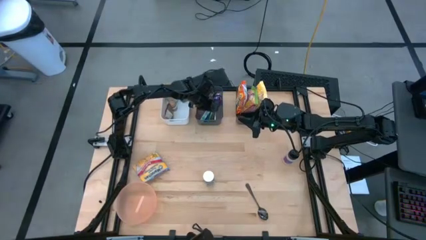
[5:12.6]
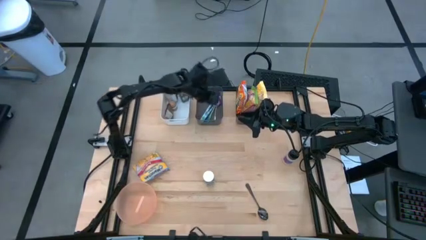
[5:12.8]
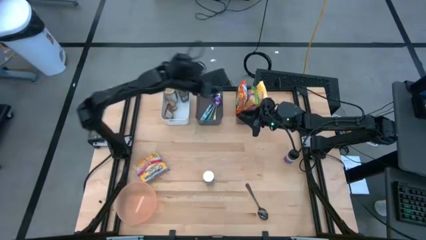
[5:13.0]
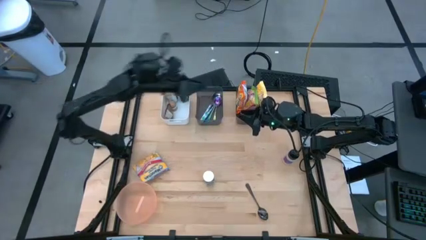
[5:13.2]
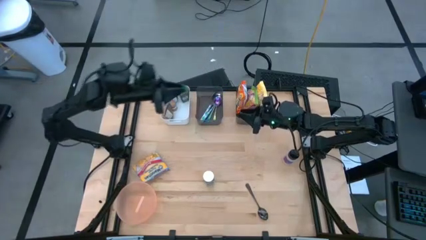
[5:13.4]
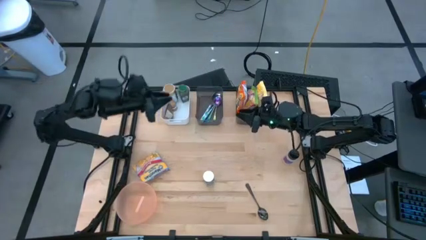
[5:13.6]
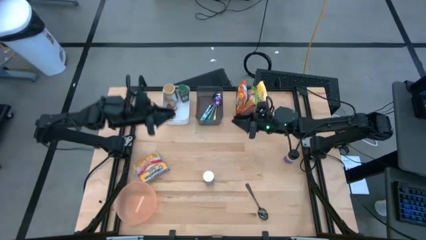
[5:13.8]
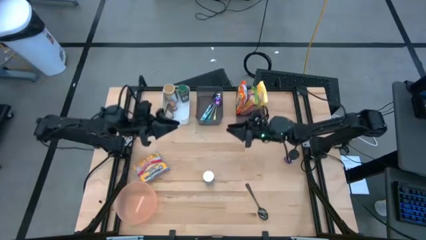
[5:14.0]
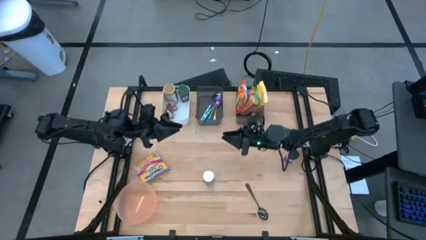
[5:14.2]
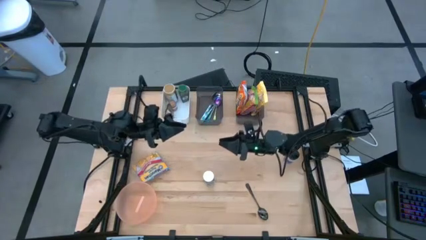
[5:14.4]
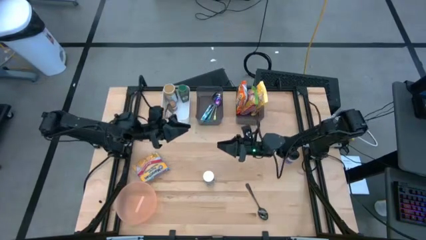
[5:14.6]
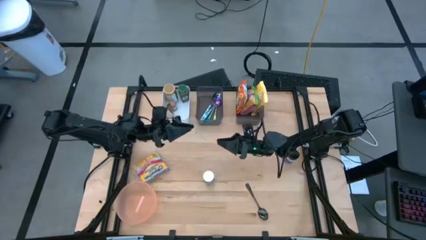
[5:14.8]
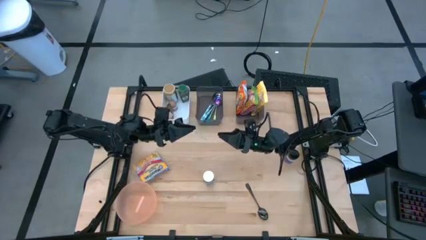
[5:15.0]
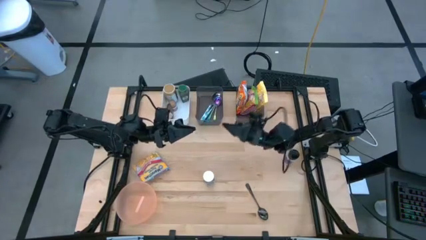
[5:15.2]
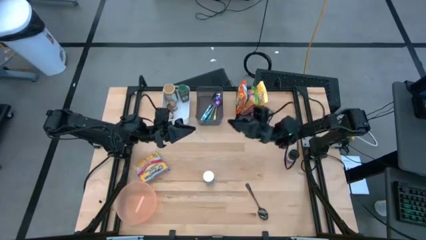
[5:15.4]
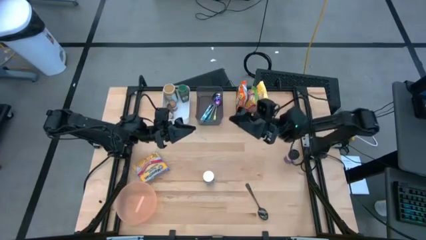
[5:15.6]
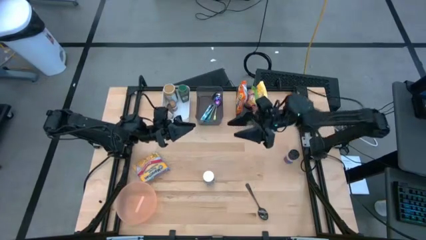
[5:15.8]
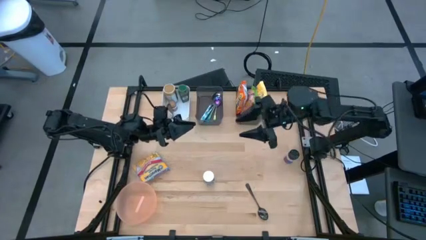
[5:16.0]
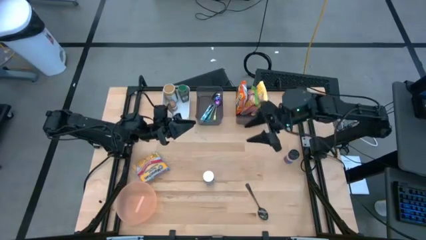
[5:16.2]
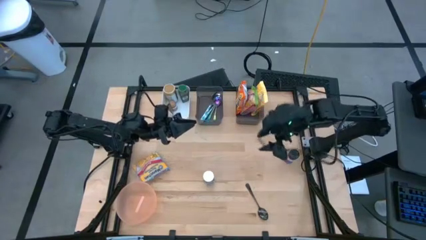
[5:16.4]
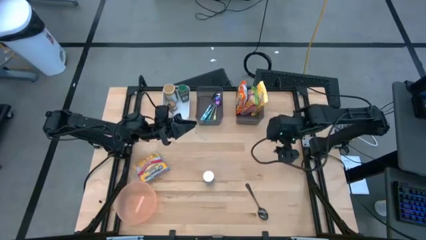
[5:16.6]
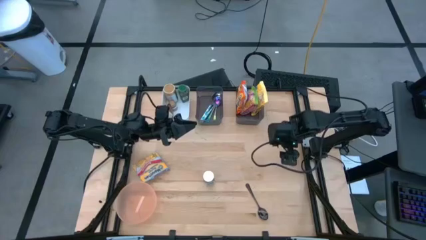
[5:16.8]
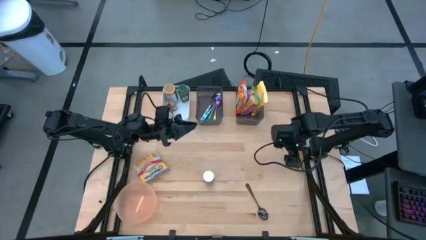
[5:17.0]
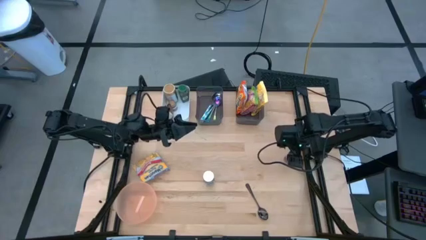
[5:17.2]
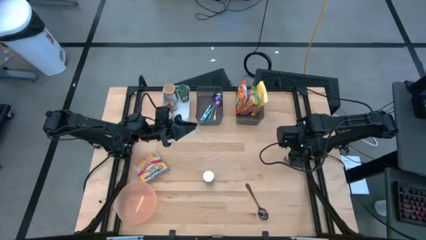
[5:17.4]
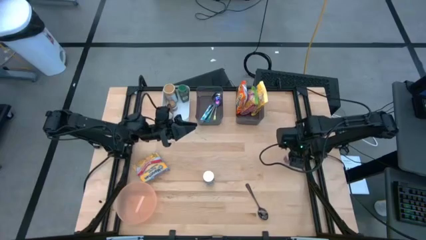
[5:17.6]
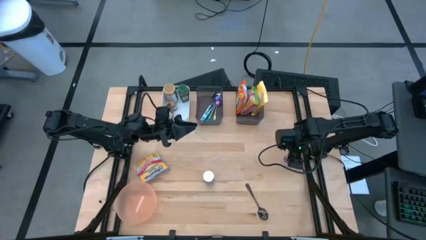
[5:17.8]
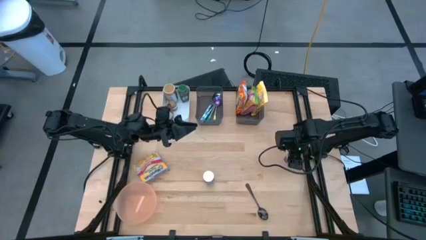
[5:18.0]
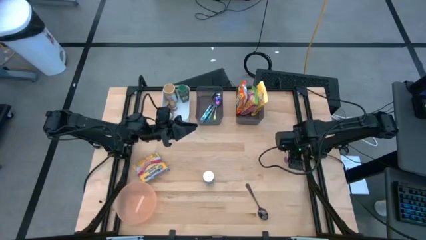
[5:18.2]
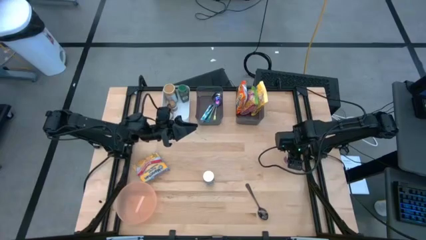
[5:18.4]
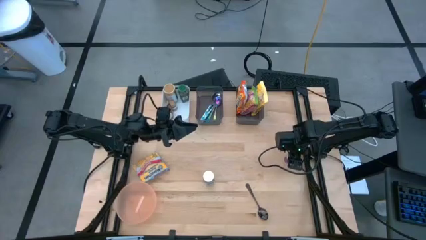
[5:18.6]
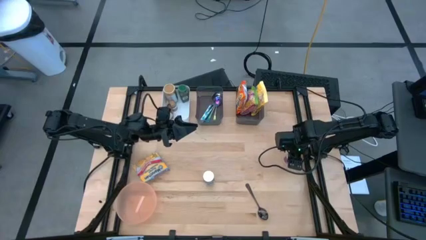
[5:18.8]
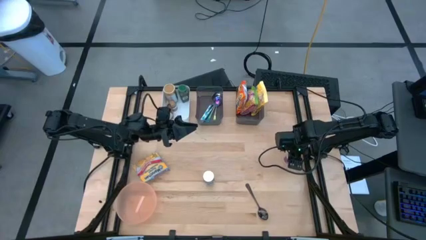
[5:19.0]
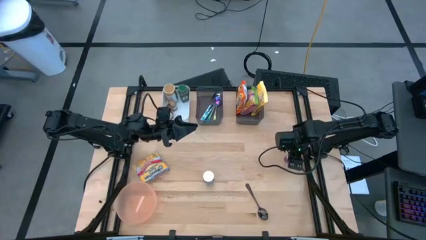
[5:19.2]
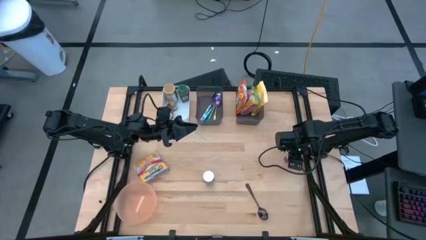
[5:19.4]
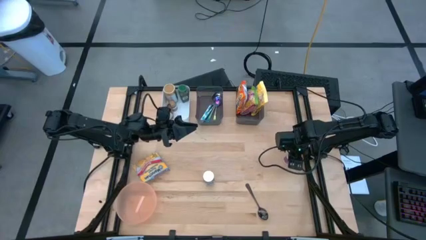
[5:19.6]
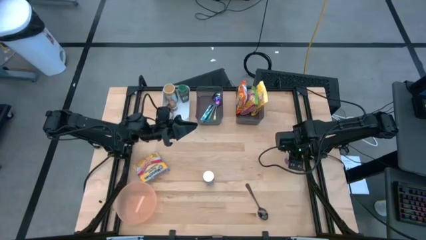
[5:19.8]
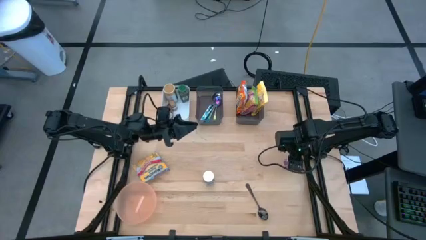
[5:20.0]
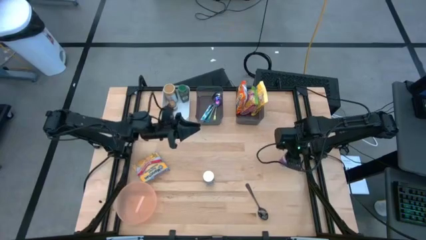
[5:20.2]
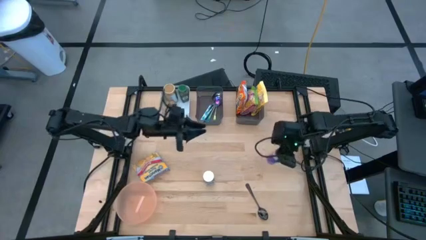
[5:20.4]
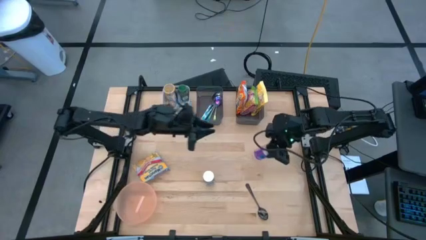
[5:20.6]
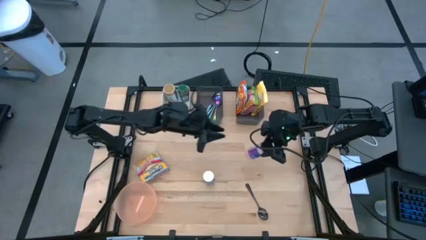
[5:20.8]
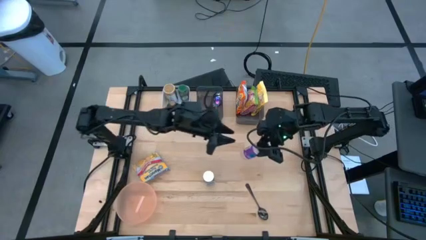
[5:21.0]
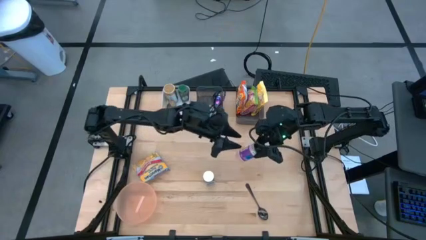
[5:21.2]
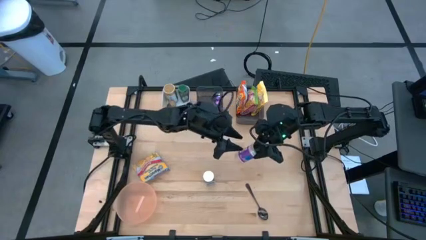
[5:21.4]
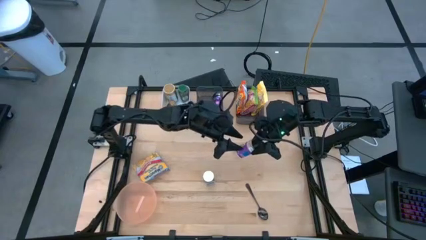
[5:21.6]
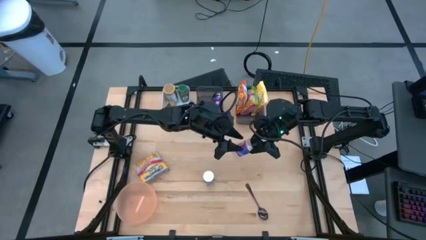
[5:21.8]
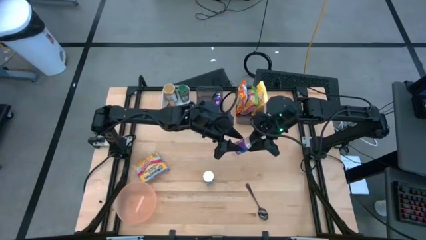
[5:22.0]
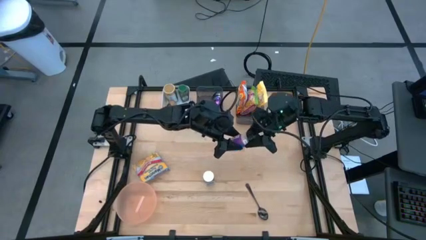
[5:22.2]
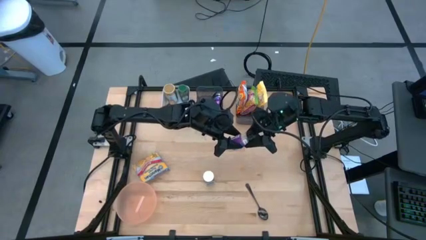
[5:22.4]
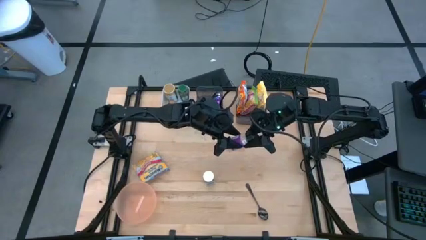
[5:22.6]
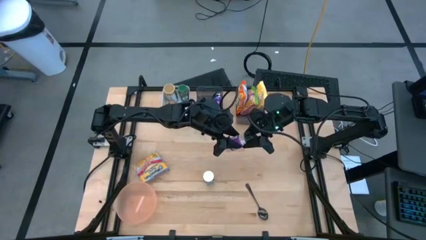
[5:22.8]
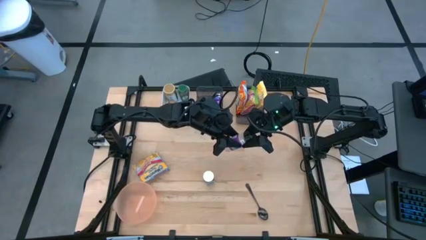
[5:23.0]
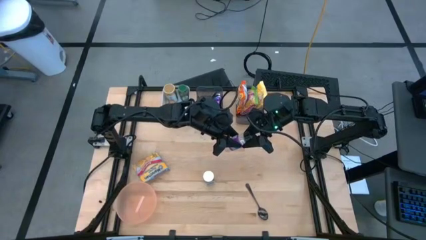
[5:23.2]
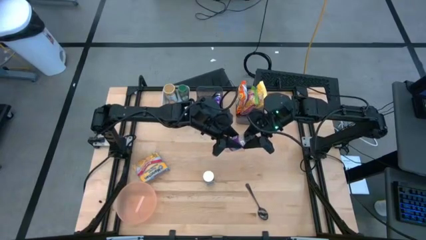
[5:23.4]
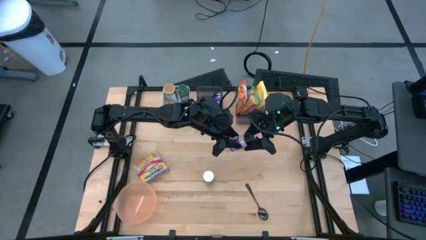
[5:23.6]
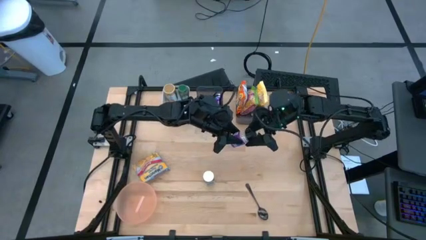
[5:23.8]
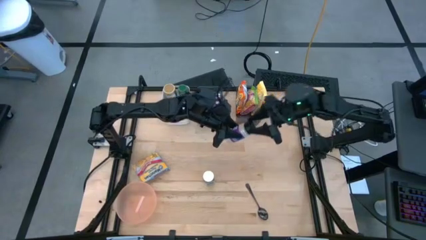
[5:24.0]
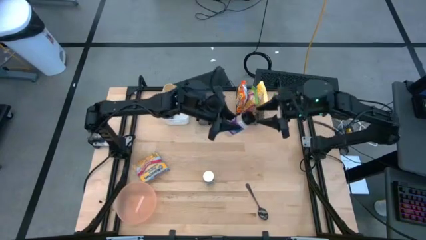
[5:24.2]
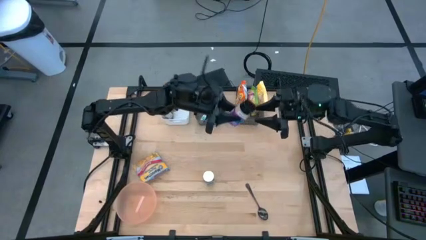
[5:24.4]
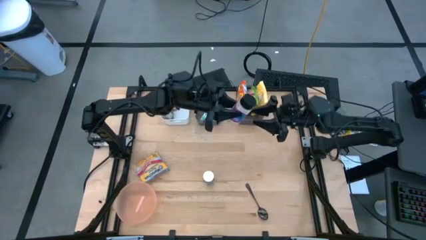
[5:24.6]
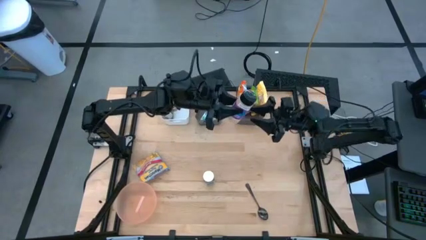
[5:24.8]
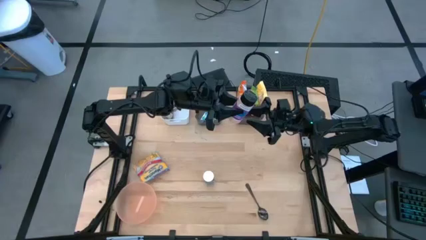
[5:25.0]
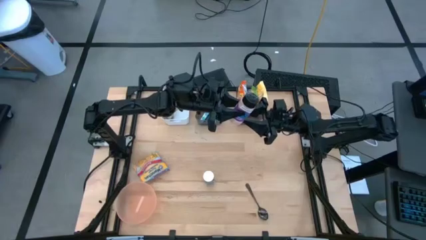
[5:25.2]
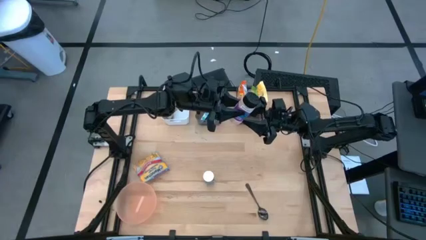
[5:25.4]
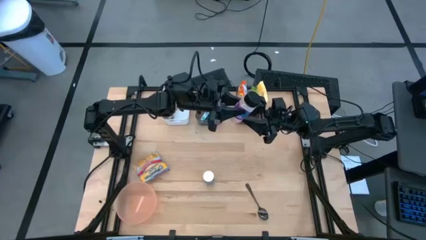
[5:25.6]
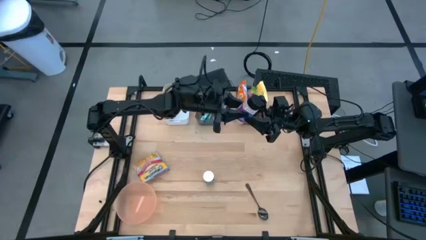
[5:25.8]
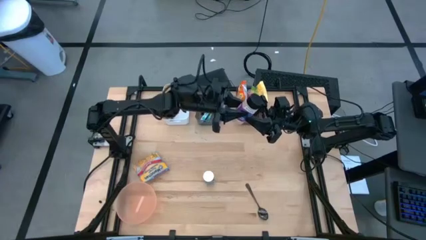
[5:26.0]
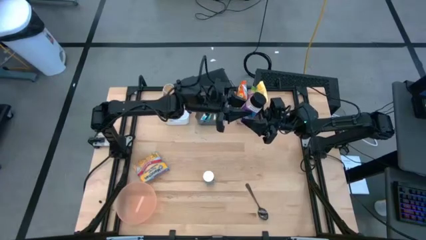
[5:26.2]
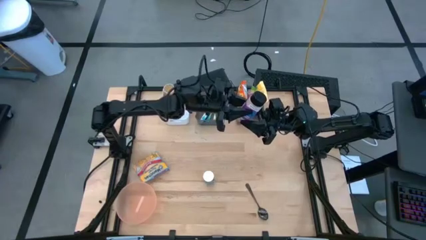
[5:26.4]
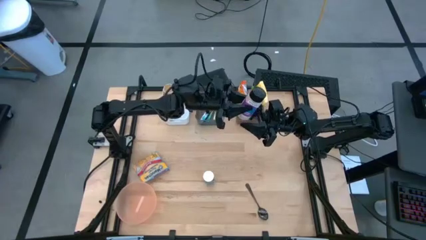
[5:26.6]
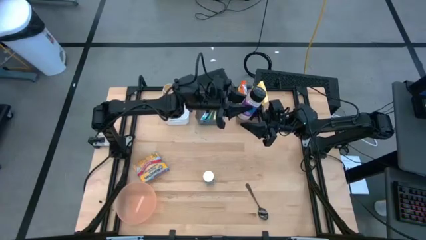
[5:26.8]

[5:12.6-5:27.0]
Task: Pick & Place Food Item
Put the black seasoning bottle into the white bin

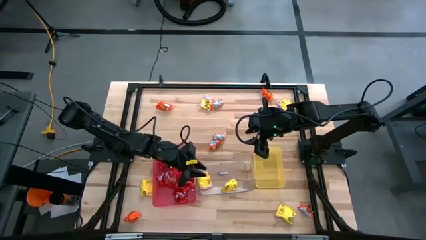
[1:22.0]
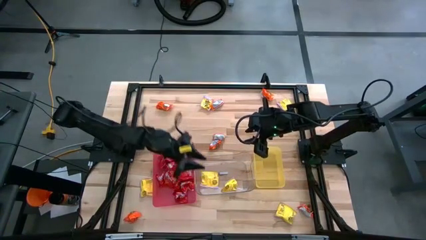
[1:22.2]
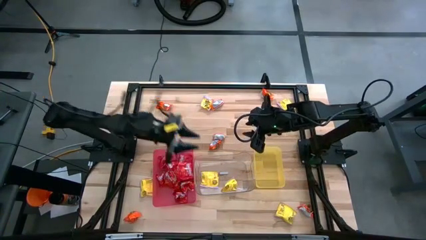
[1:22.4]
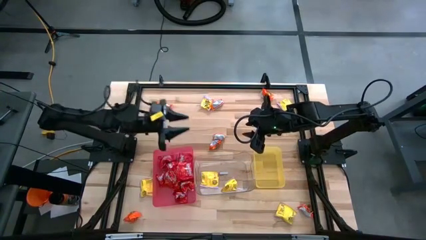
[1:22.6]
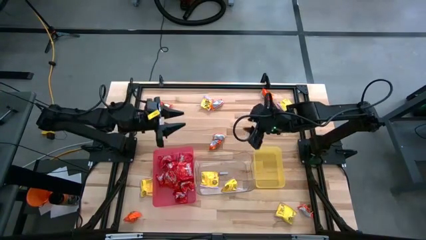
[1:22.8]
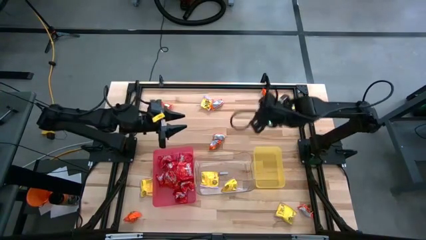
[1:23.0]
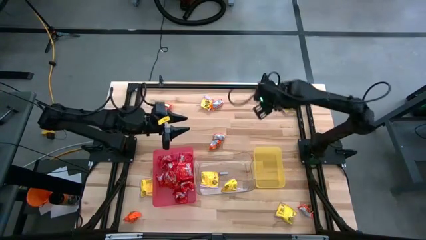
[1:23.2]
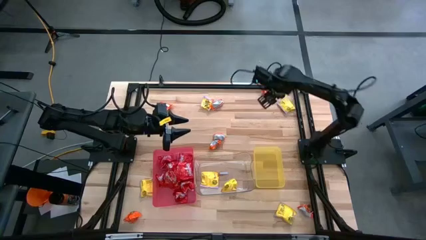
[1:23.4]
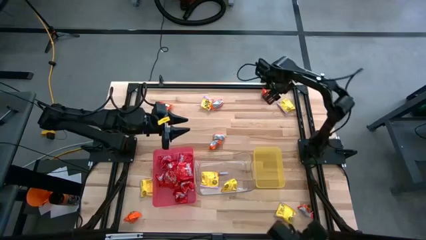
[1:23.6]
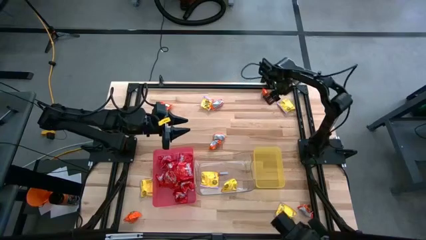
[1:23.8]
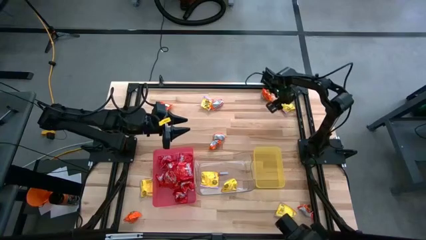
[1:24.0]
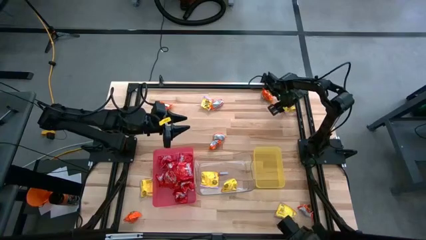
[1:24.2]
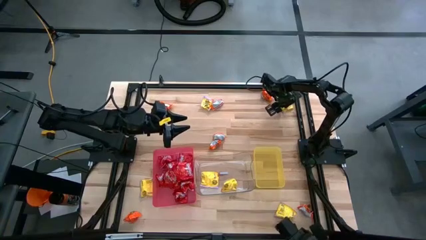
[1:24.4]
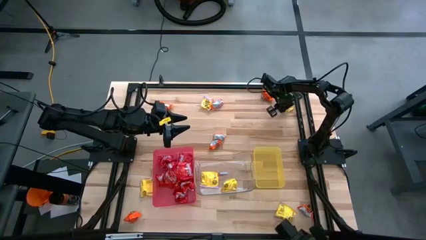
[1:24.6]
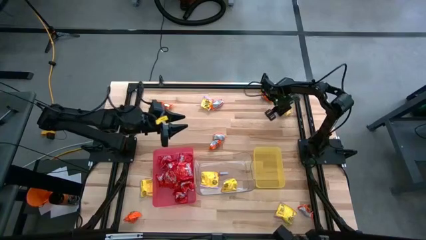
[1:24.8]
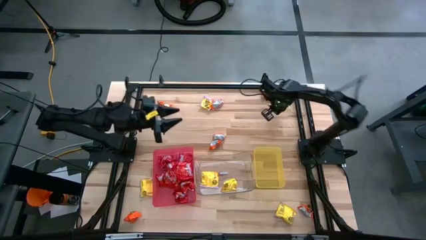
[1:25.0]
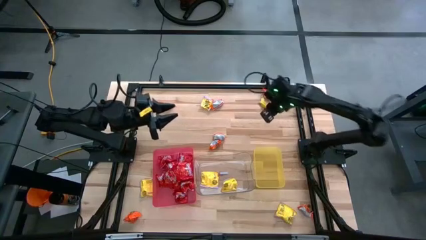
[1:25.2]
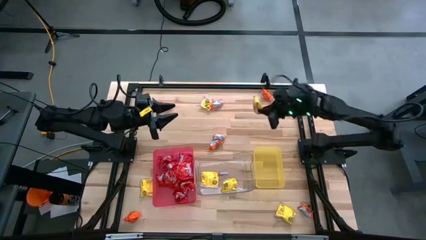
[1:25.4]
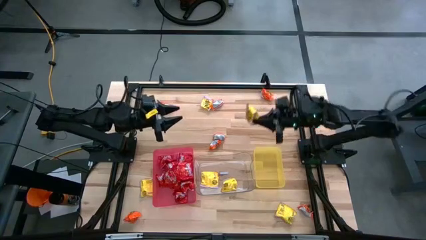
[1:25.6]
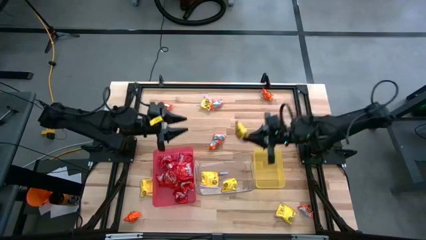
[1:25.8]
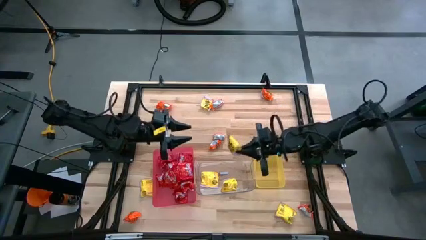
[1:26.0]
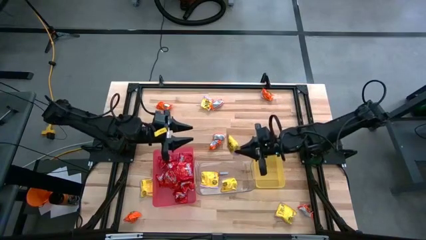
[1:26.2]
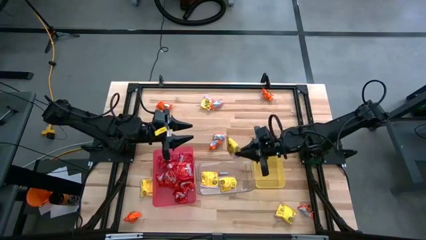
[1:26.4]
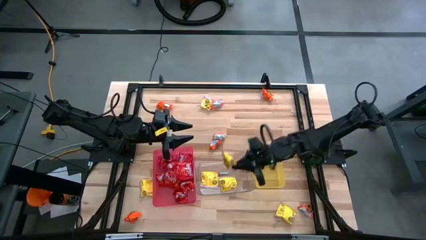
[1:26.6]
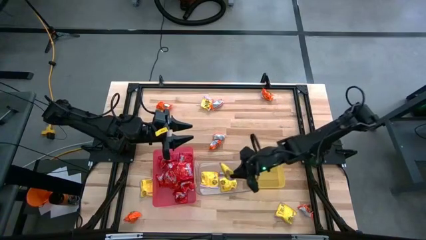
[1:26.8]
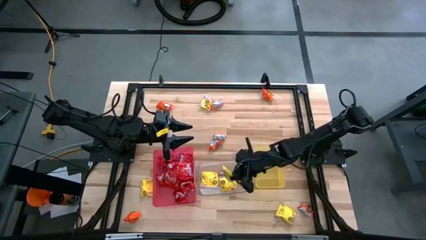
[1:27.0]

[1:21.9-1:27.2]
Task: Sort candy
Put the yellow candy into the transparent bin
